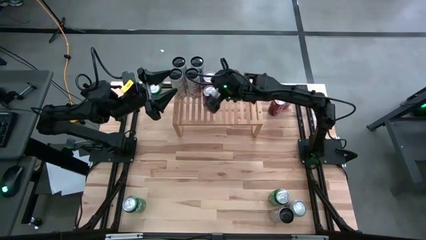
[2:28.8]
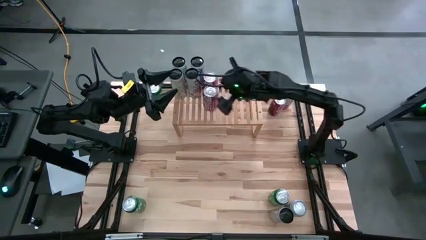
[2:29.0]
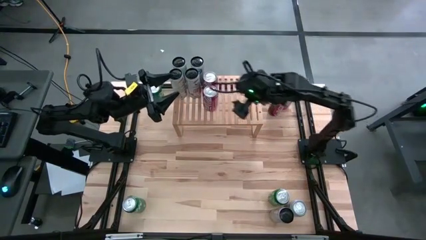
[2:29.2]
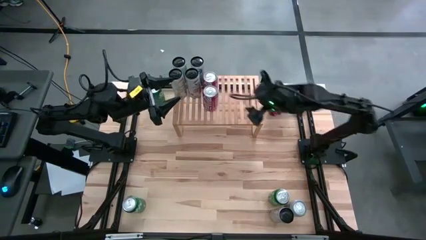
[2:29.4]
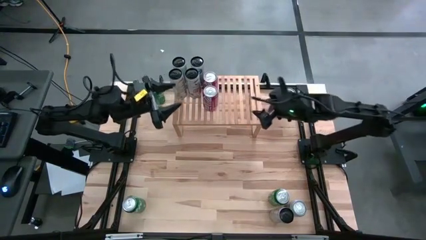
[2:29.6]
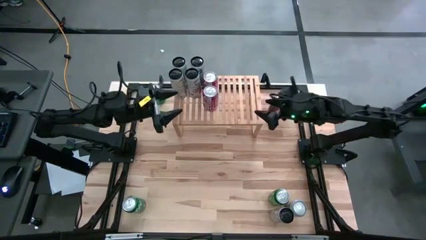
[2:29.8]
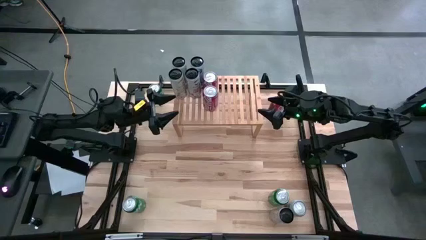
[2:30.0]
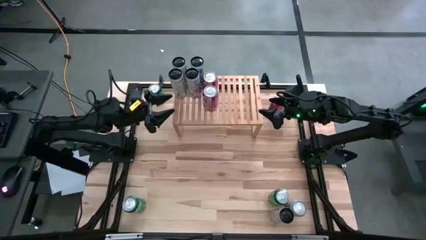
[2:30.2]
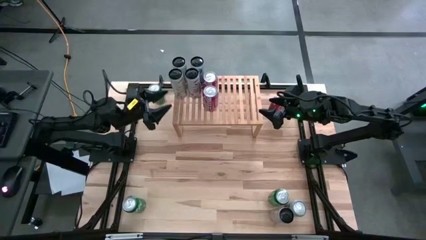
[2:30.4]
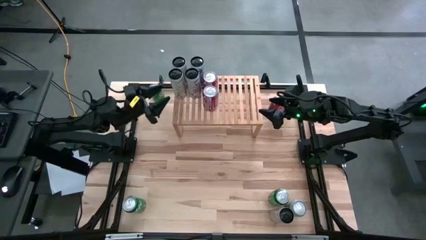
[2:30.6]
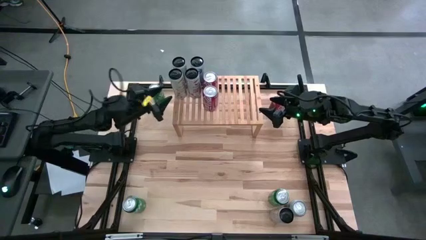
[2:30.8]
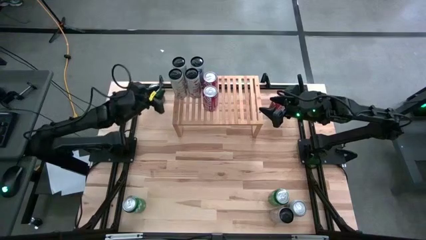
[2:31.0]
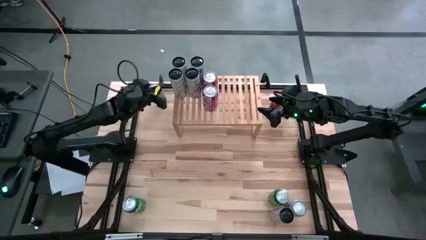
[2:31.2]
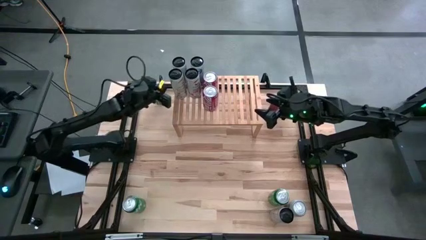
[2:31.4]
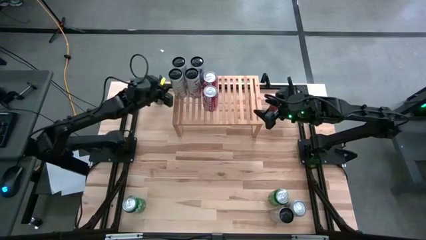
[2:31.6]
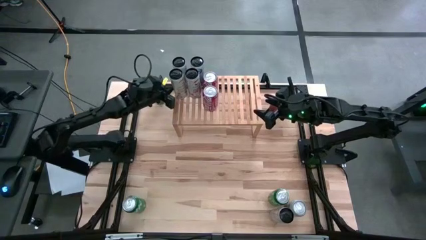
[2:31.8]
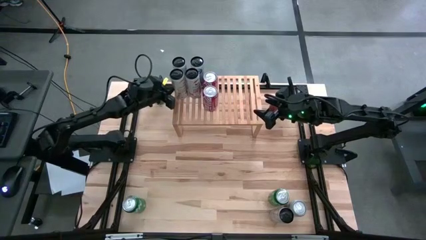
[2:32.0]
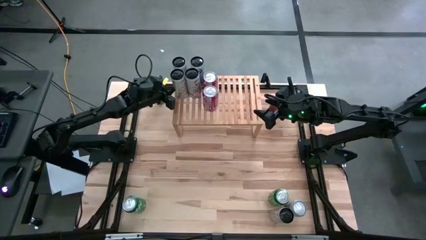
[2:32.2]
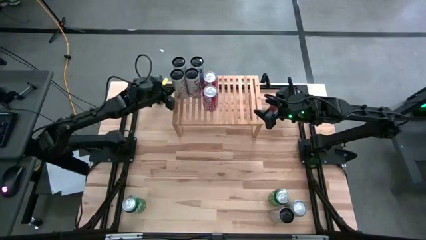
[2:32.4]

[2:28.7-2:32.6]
Task: Place canned beverage on shelf
Adjust the white yellow soda can on the shelf

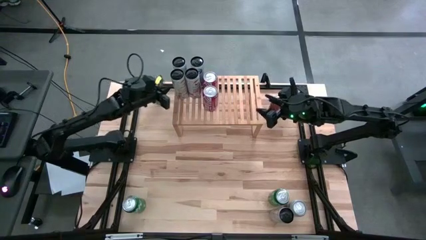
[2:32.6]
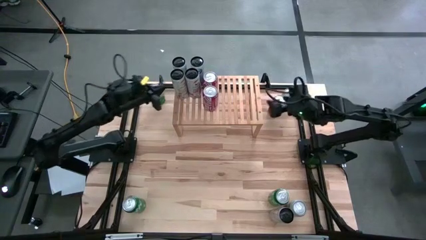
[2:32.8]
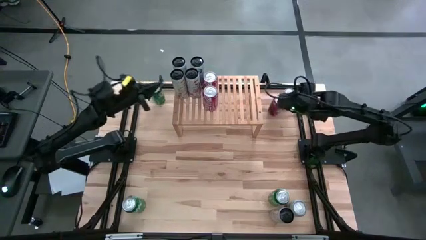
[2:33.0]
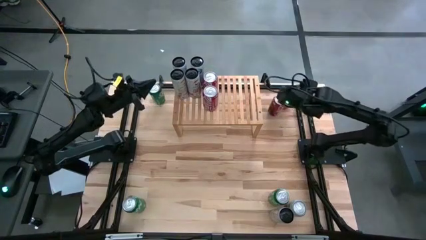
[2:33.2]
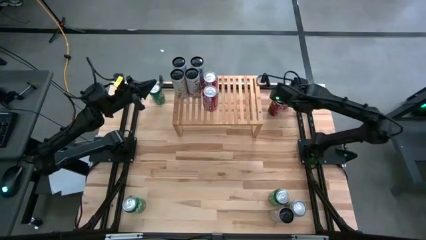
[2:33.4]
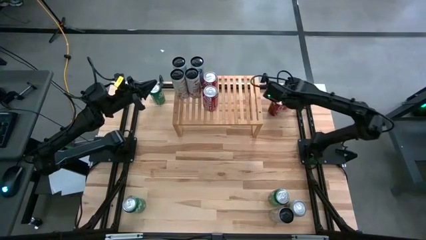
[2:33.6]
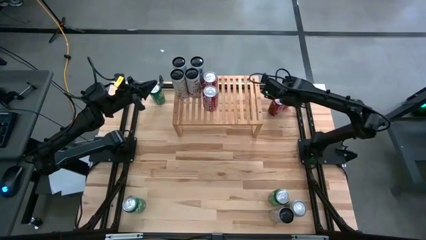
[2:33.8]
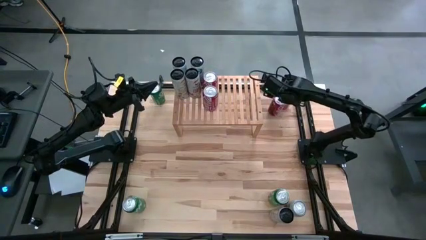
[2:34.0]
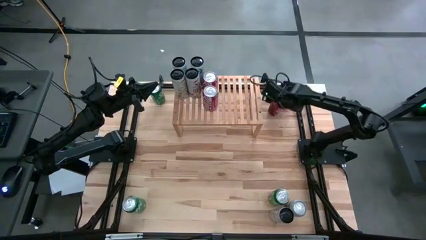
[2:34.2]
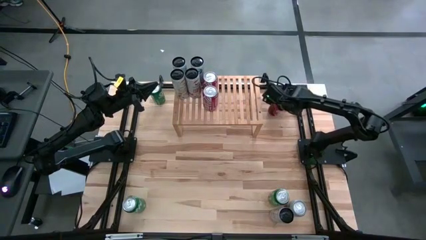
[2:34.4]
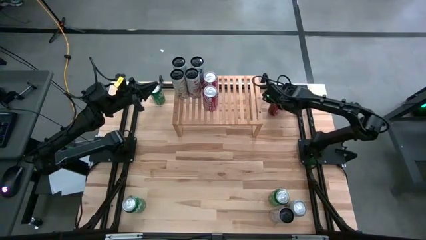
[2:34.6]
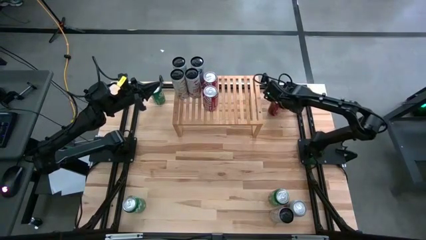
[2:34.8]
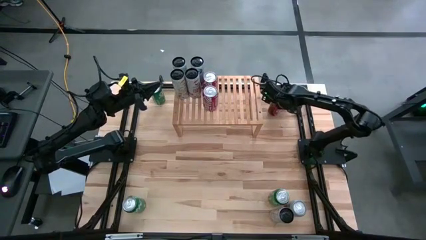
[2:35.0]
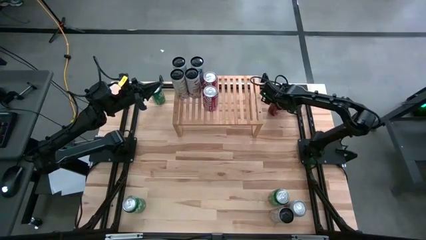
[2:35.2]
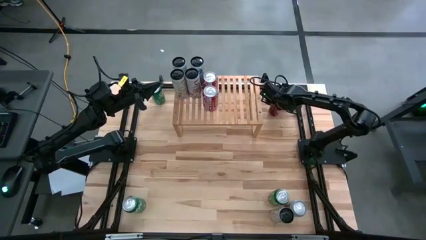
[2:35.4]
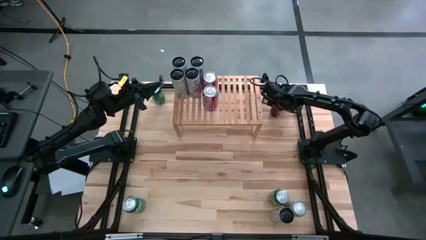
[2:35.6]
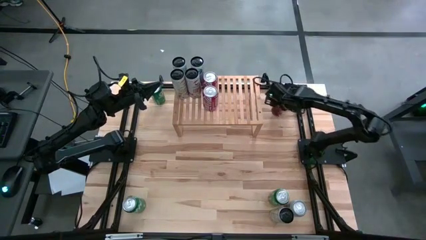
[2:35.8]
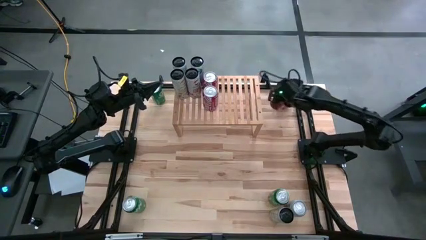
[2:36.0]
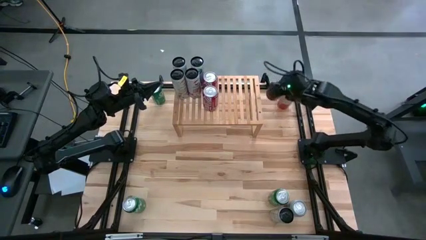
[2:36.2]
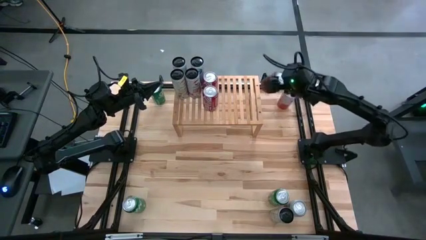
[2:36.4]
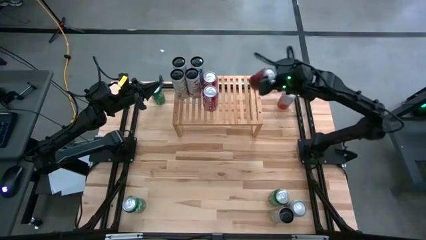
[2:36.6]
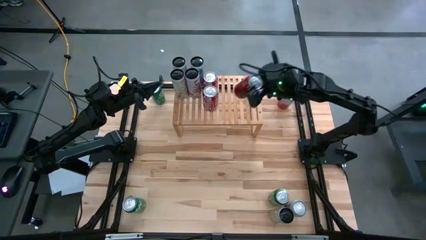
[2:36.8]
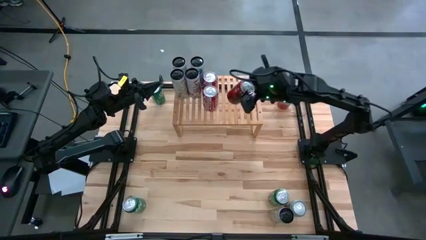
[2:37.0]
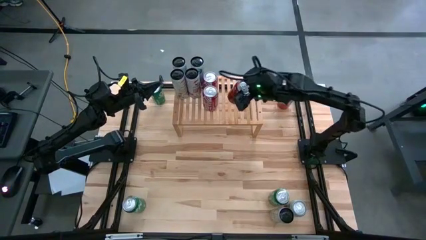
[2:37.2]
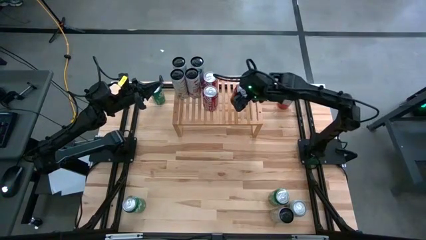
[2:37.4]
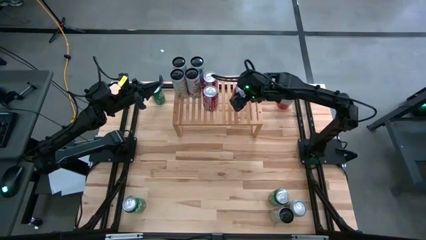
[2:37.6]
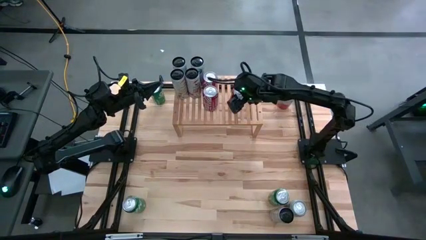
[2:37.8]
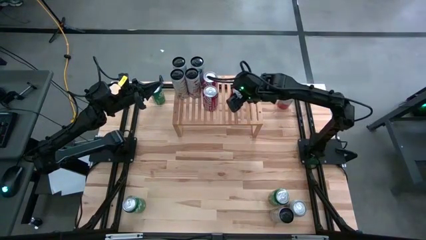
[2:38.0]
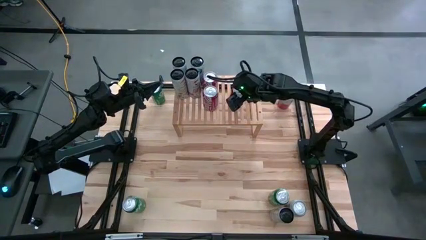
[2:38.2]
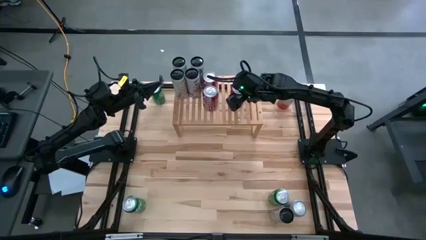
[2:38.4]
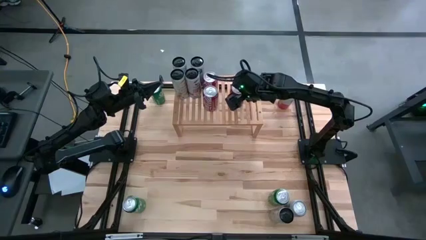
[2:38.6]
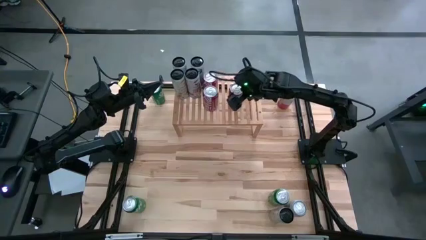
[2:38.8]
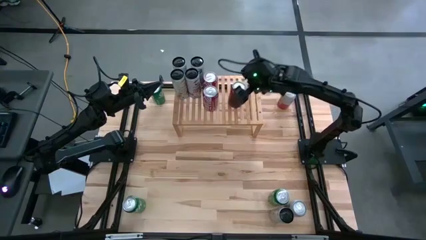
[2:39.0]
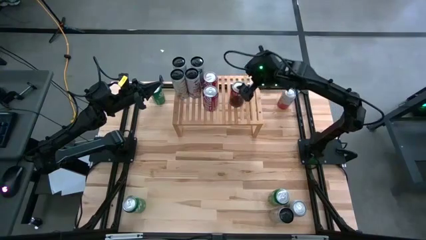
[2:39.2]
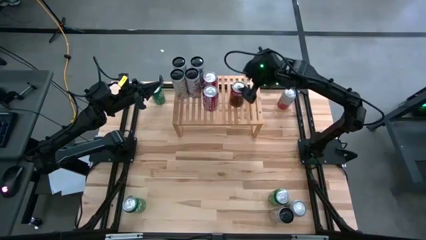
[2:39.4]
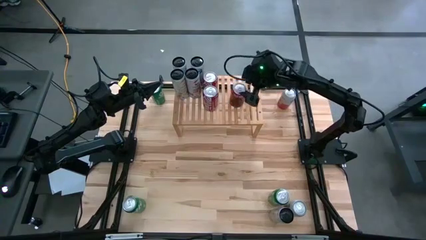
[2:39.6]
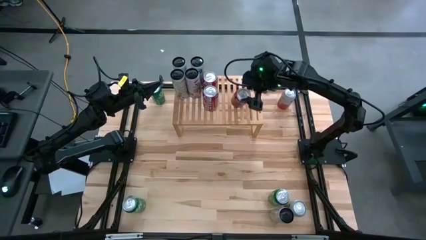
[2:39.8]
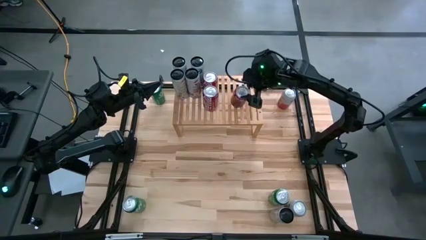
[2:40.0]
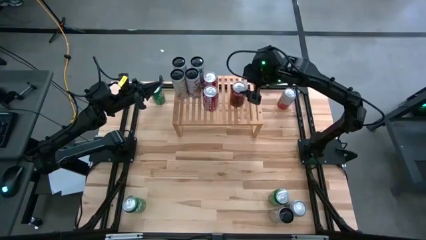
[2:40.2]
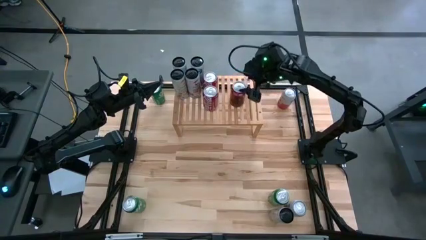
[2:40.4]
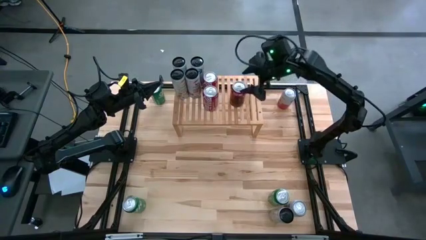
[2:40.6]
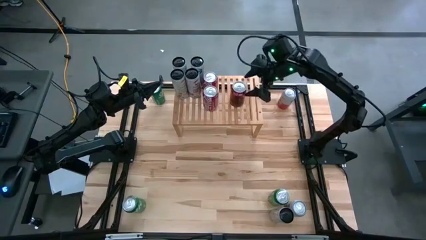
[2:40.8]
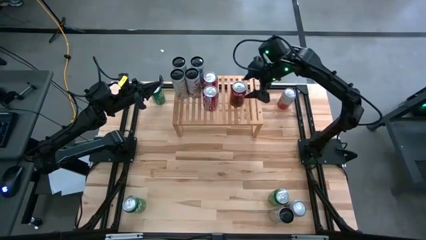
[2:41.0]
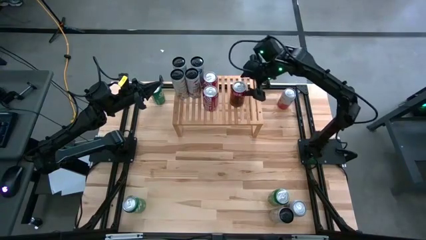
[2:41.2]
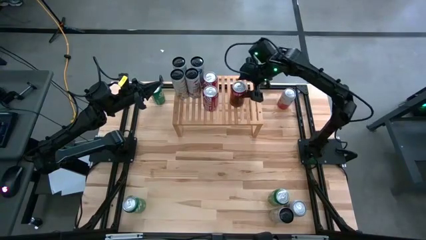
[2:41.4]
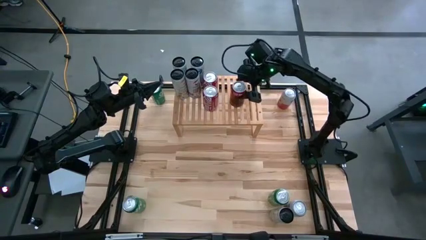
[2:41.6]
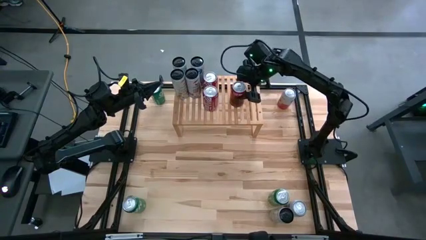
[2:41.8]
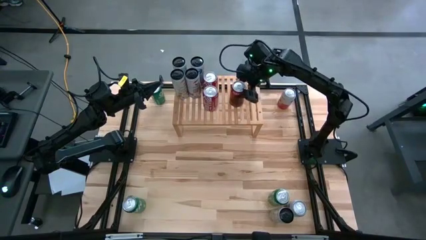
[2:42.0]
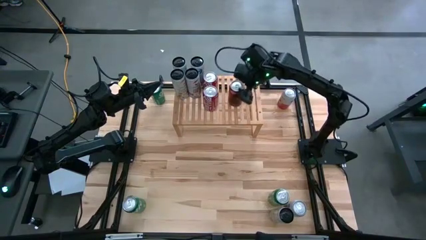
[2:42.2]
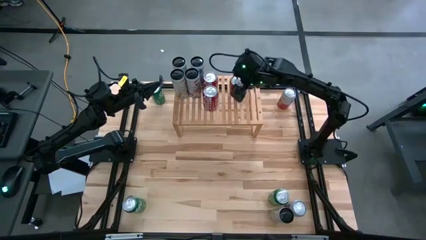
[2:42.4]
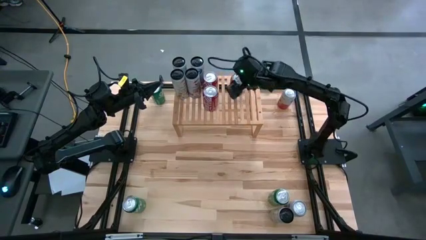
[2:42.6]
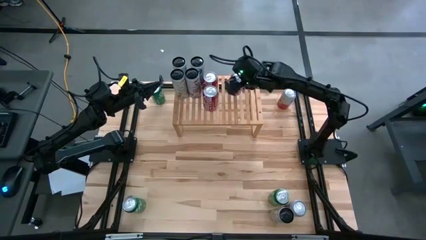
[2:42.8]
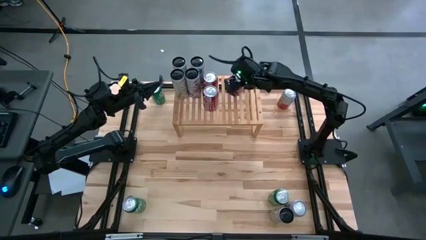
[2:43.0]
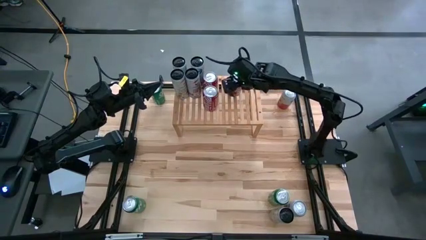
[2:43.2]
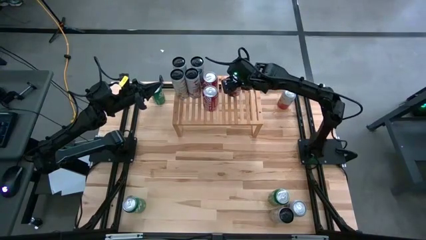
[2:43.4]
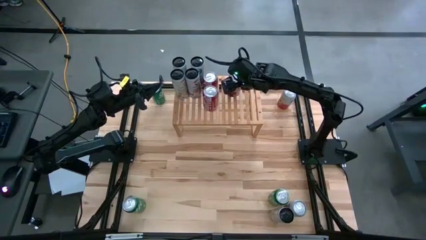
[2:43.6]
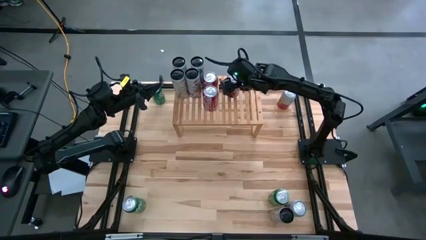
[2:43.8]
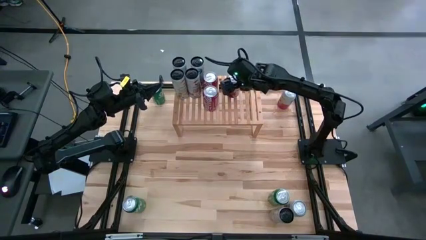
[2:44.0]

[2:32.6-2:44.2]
Put the red soda can on the shelf aligned with other red soda can
